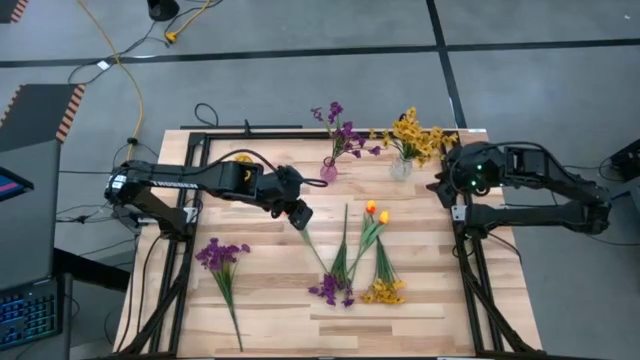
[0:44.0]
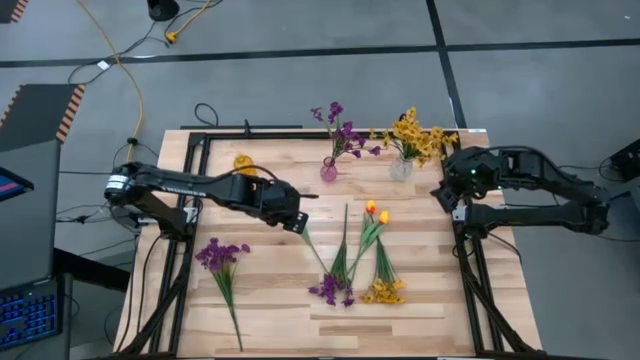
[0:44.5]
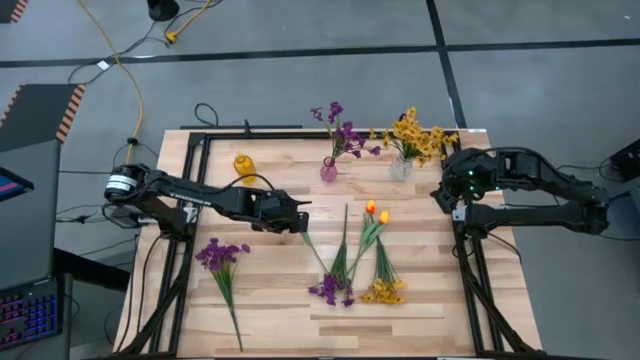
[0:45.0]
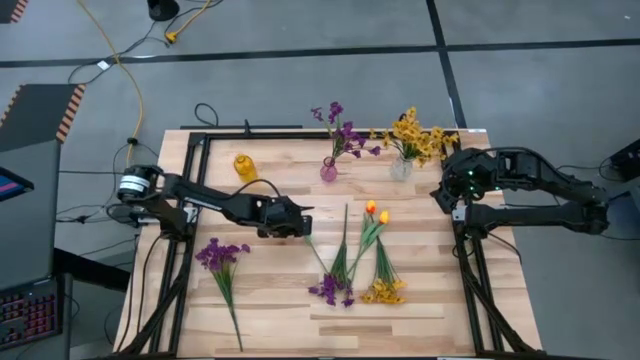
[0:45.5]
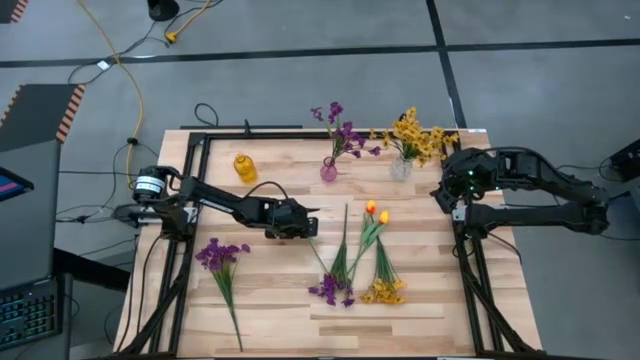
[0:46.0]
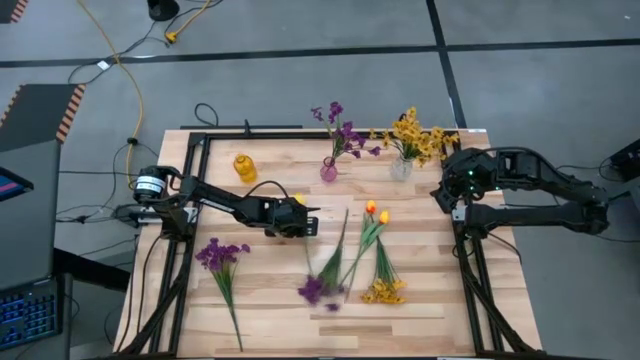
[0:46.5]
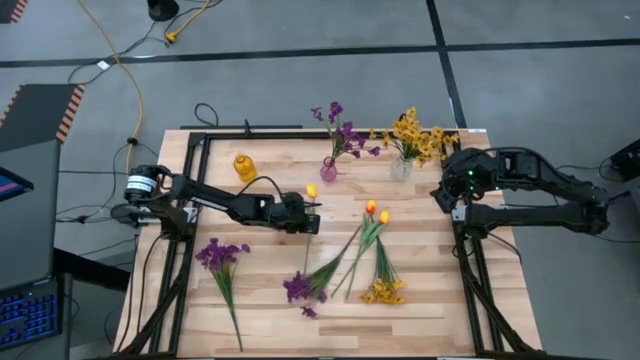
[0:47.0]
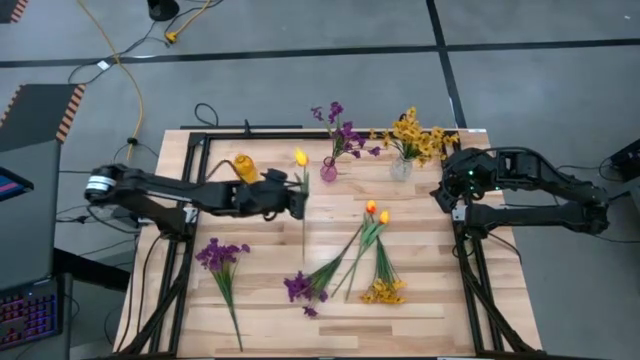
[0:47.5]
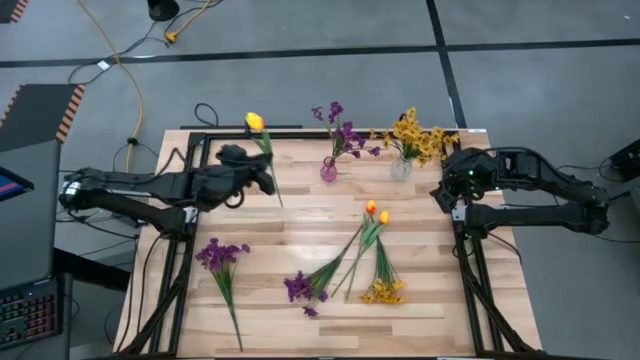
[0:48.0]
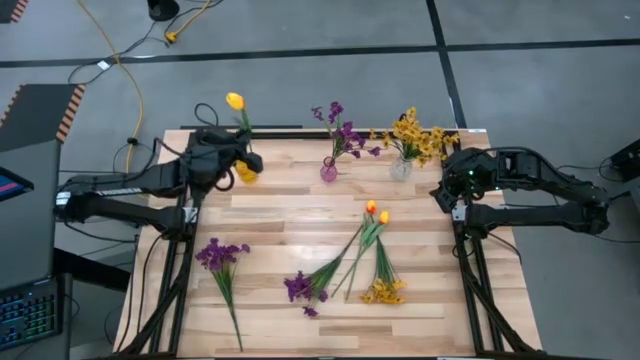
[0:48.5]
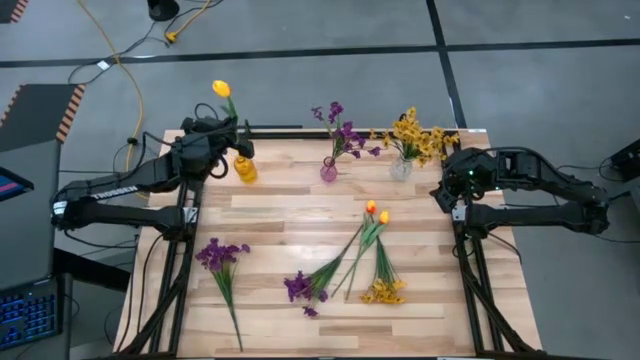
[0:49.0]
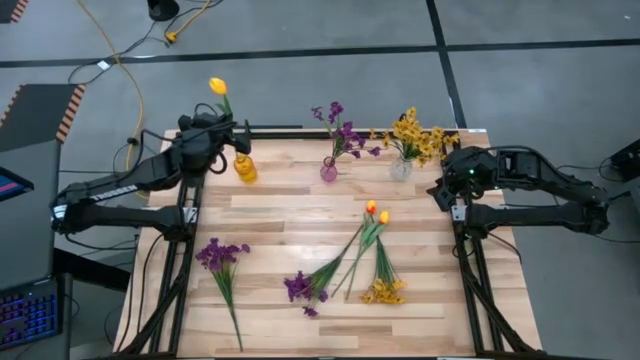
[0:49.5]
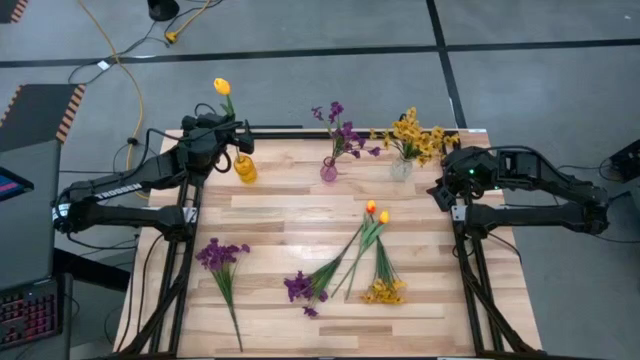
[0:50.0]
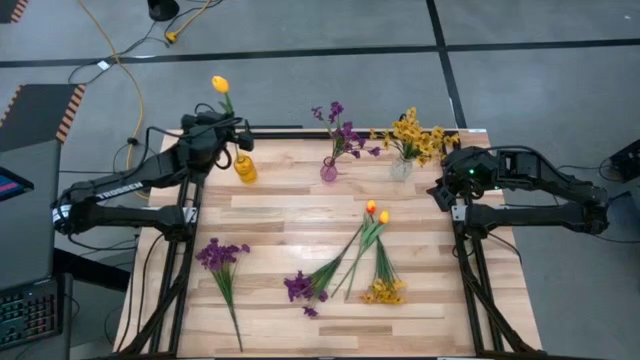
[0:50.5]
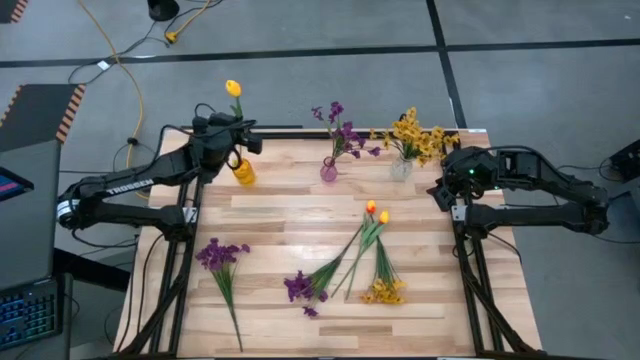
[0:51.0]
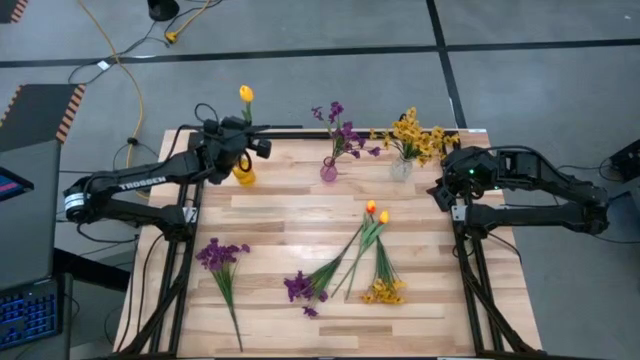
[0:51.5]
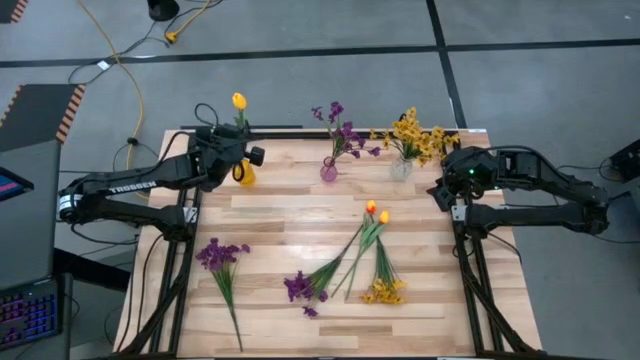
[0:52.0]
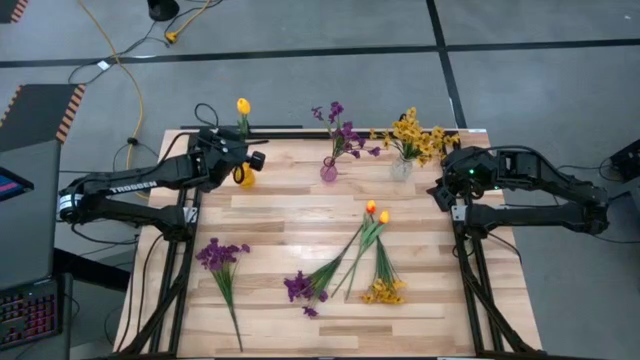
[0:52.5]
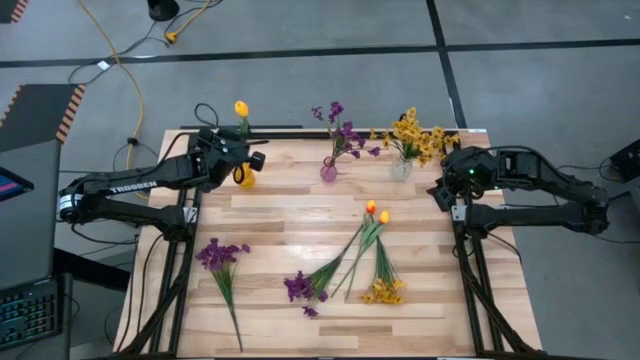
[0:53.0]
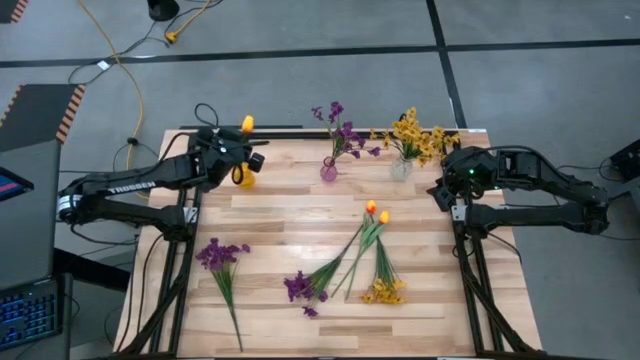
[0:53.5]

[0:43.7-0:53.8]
Task: Sort flowers into vase by color
Put the left yellow tulip into the yellow vase

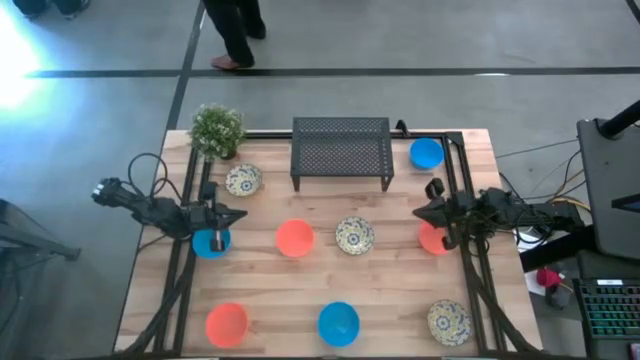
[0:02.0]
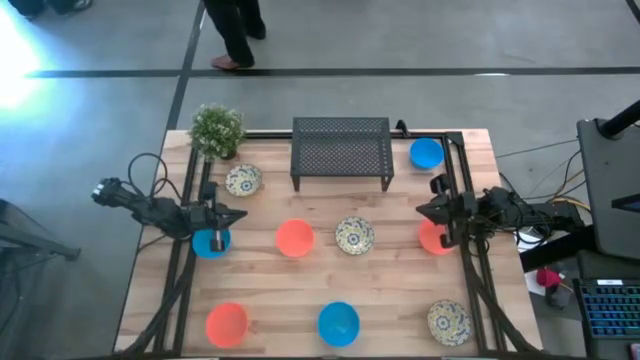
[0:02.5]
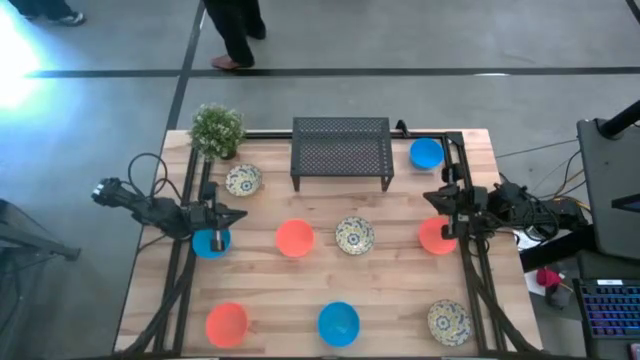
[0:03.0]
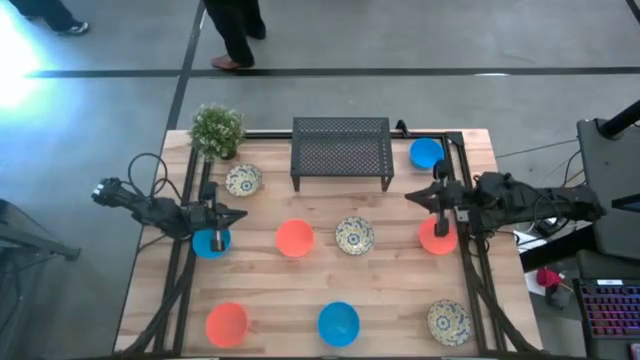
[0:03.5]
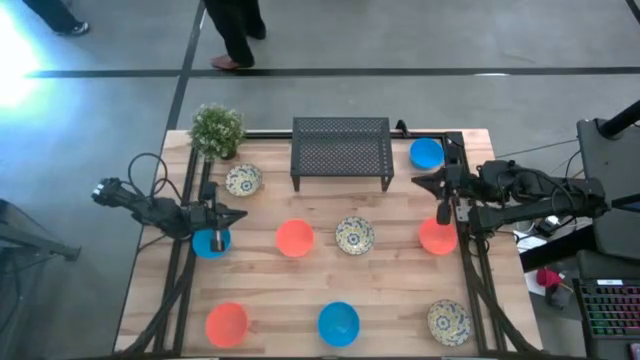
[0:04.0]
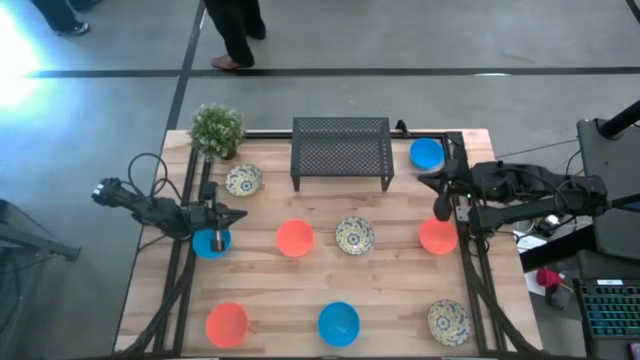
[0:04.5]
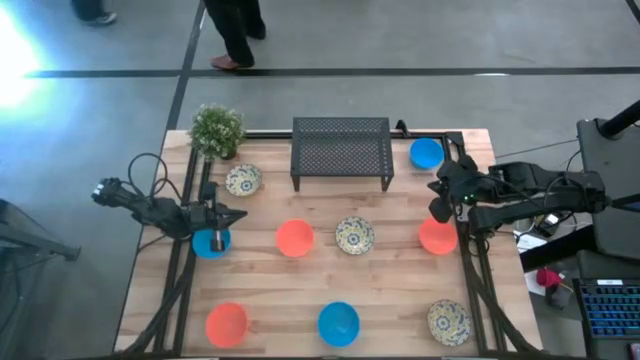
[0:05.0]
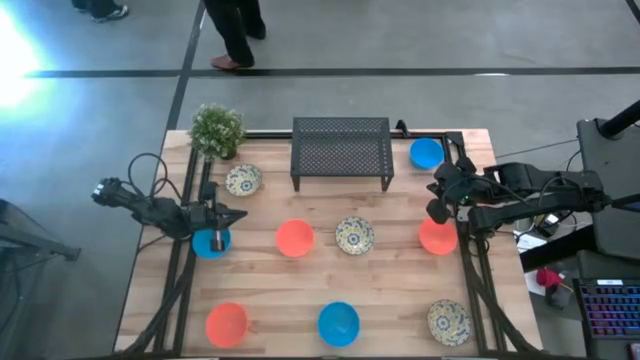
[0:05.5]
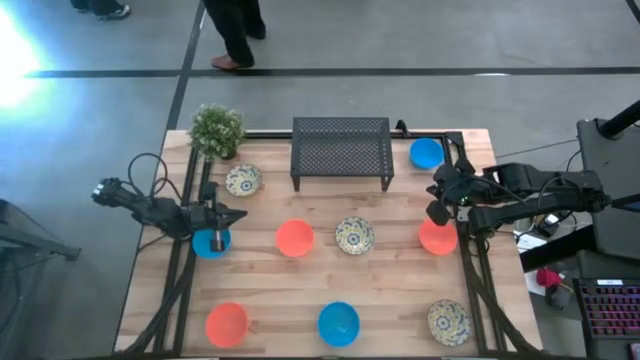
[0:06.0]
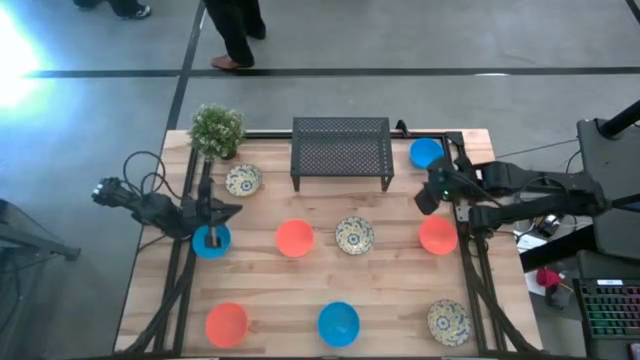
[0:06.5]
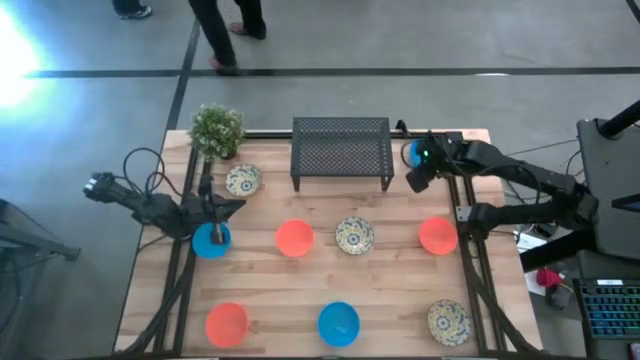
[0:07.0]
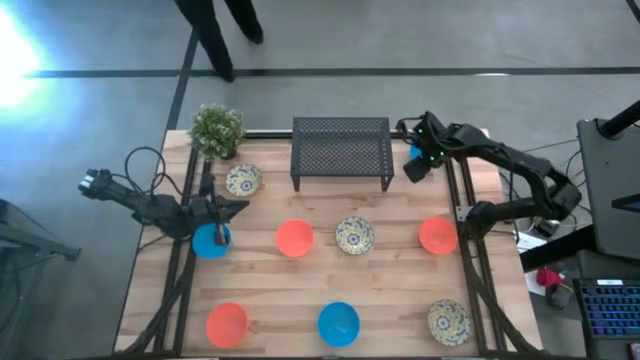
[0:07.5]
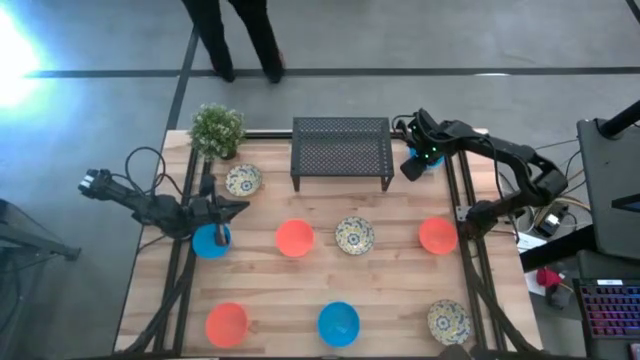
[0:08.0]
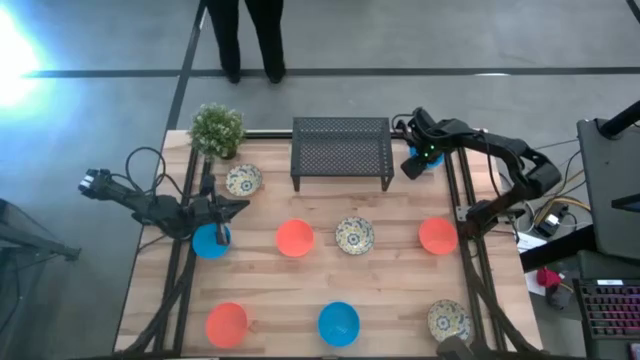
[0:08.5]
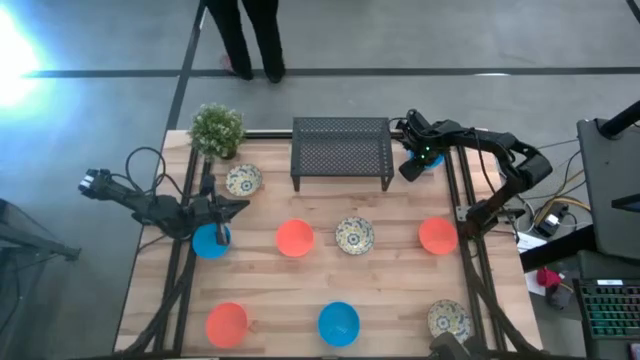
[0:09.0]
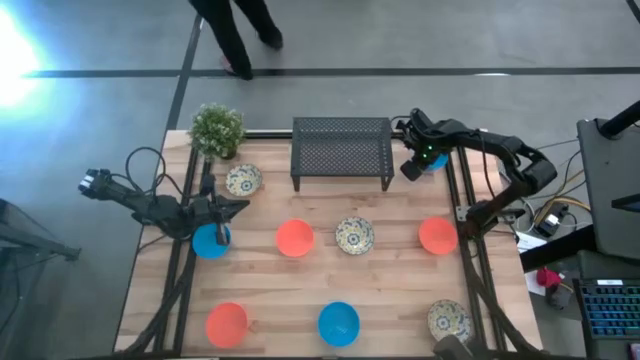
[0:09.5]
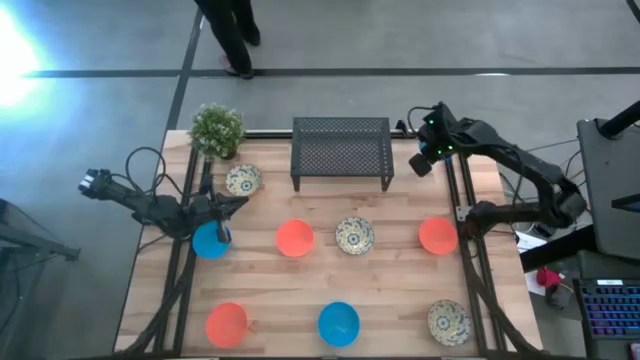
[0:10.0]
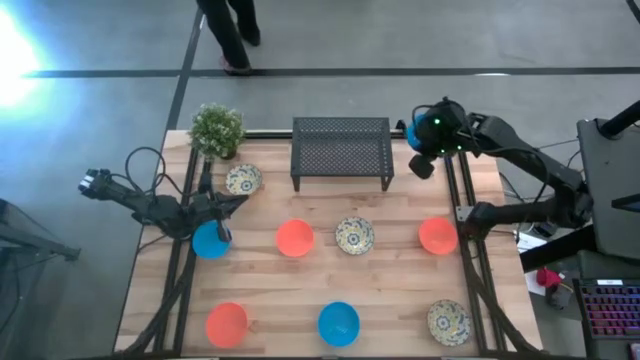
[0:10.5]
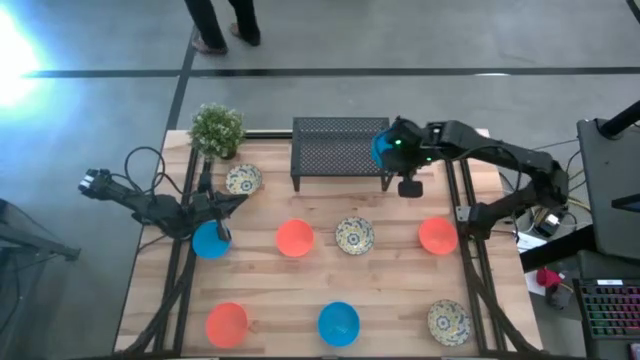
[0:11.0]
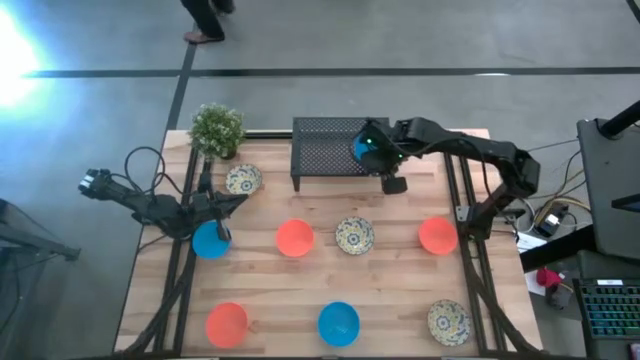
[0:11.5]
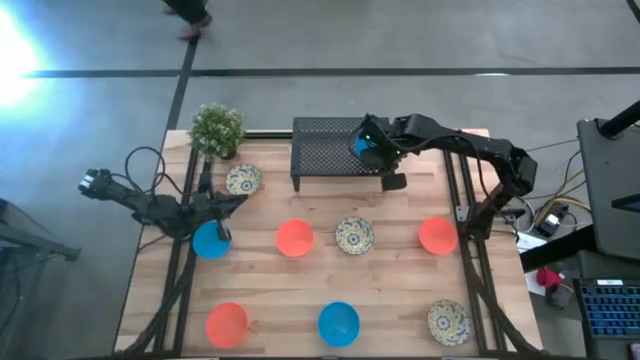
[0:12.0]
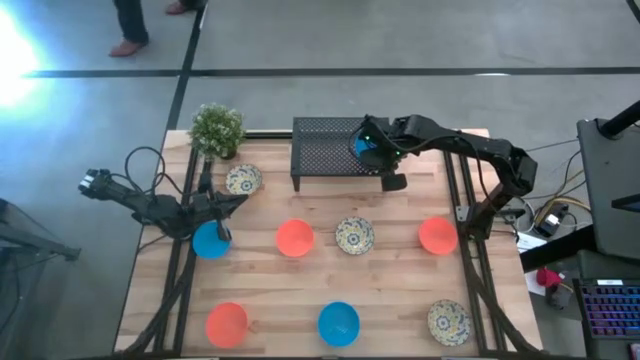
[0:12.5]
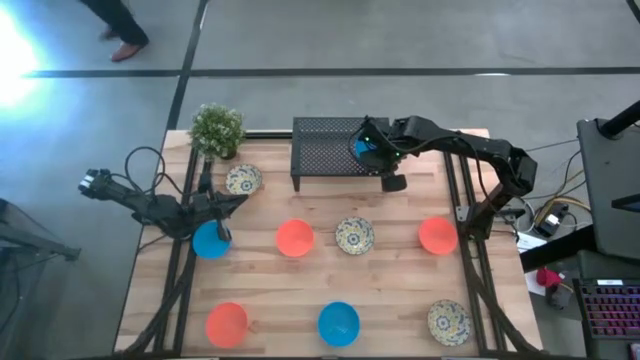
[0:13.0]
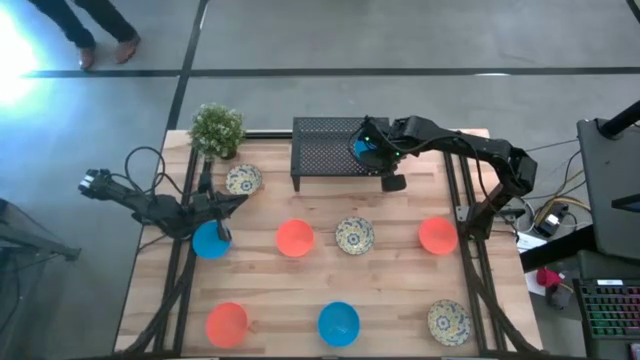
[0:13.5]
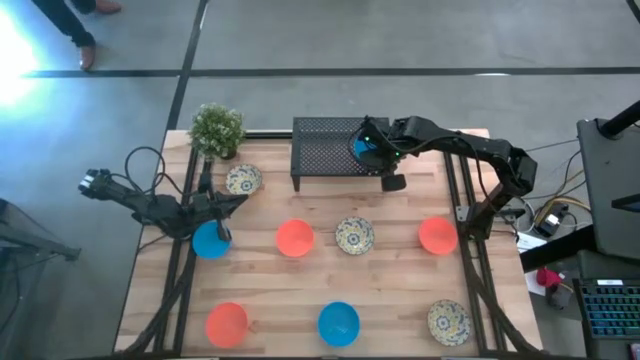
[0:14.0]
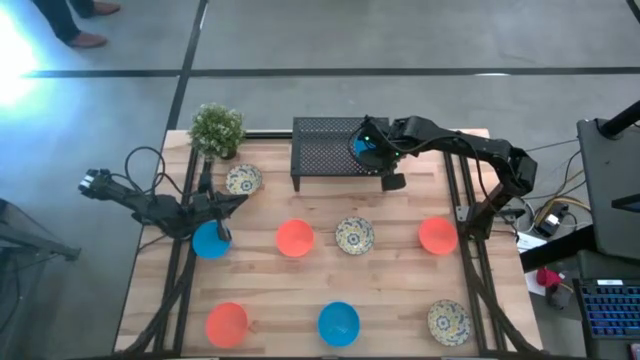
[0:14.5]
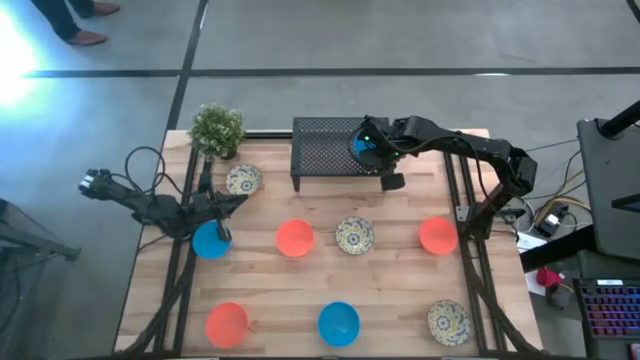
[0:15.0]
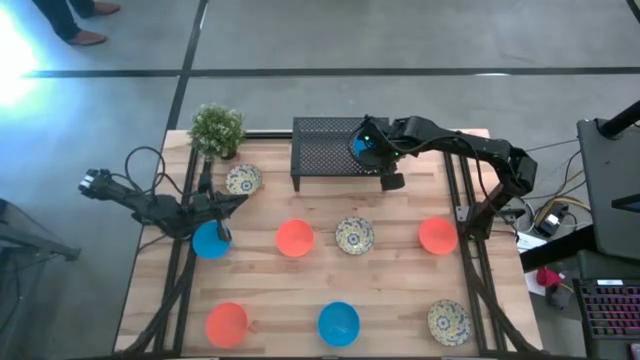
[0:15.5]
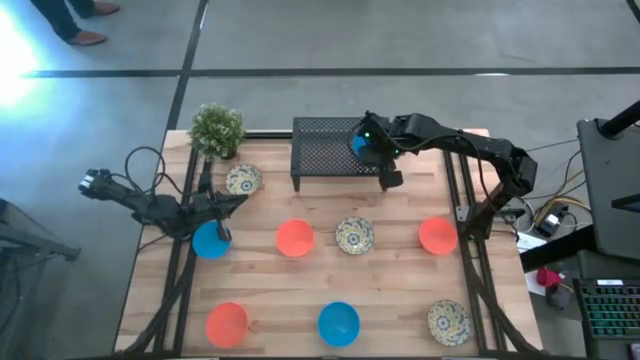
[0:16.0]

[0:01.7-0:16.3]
Task: Pick & Place Mini bowls
Put the top right blue bowl on the shelf
